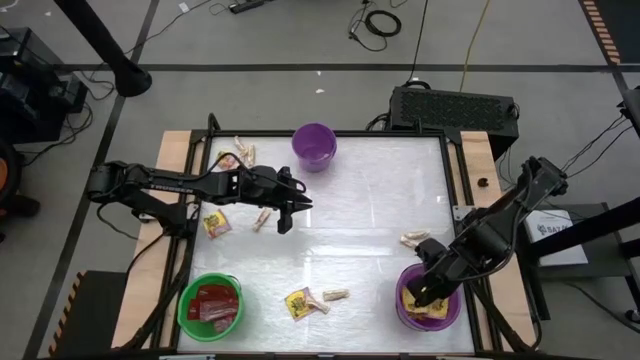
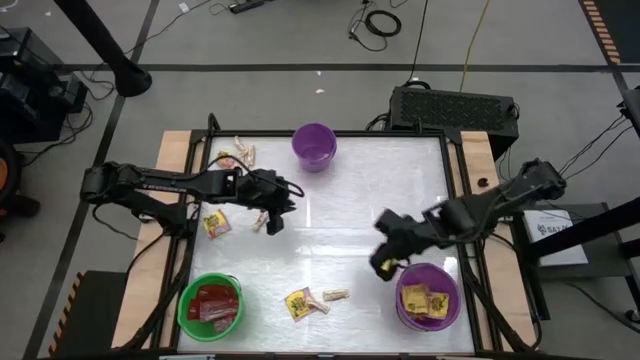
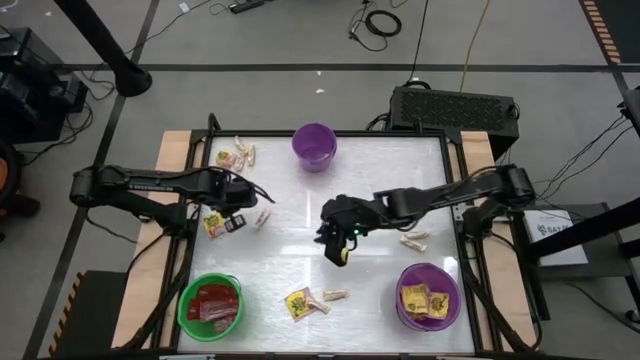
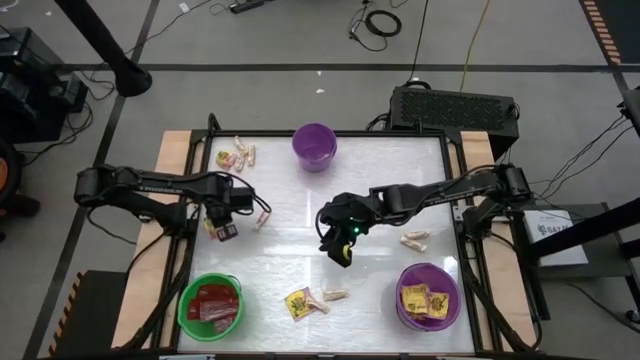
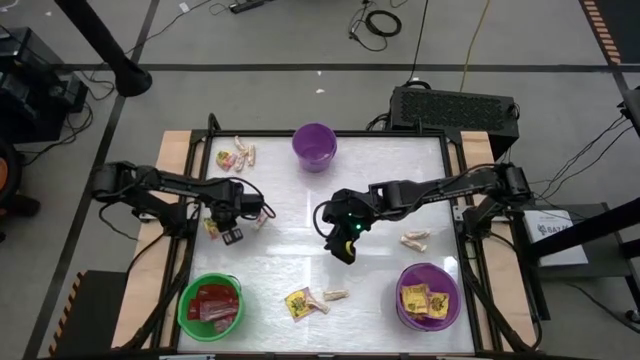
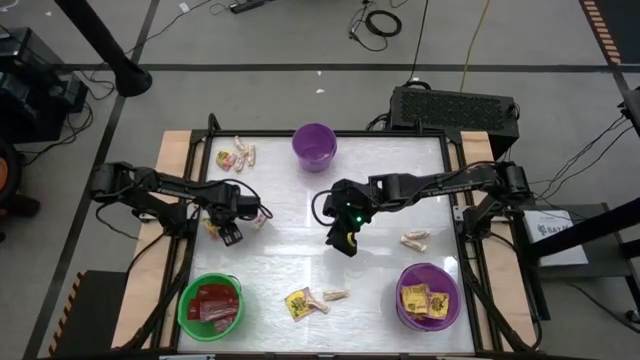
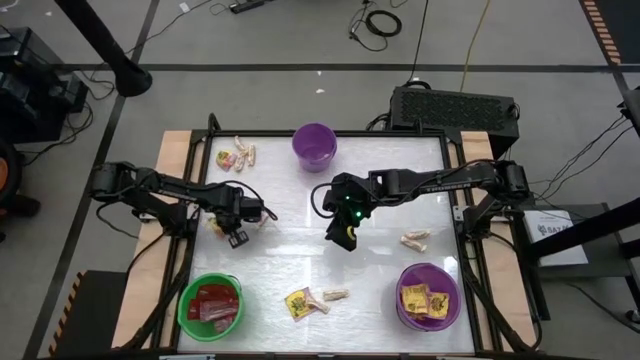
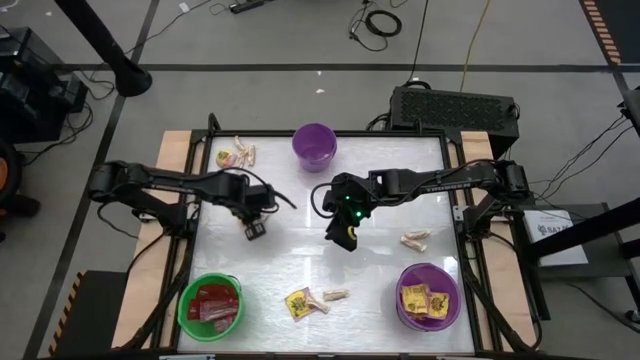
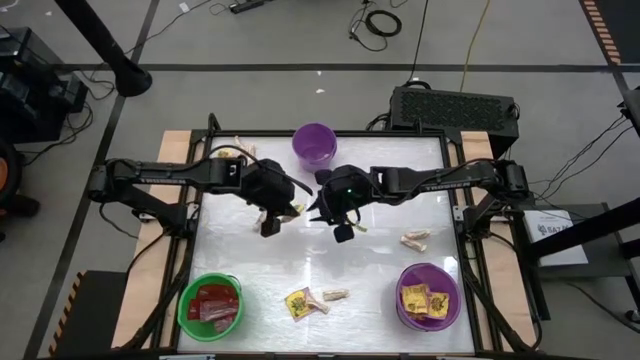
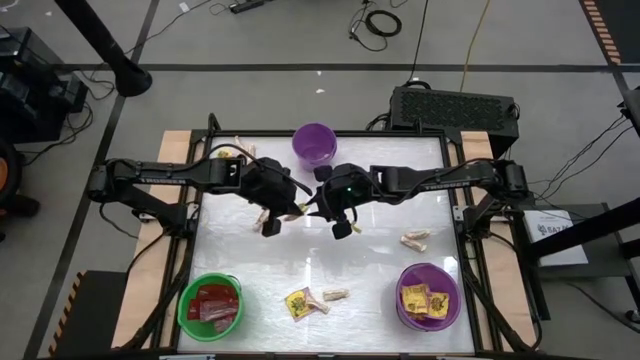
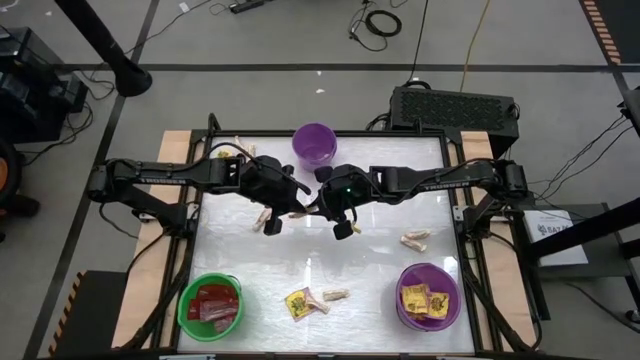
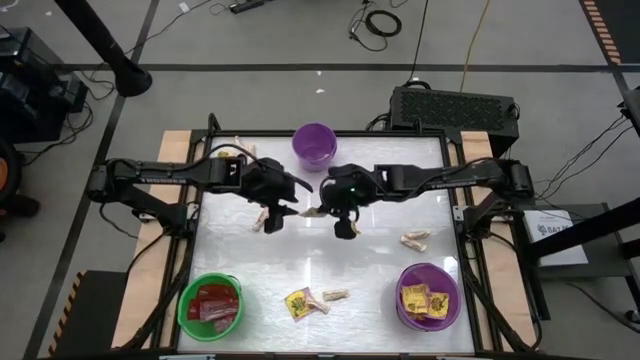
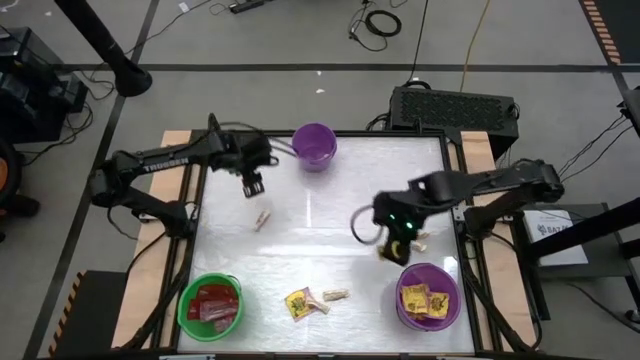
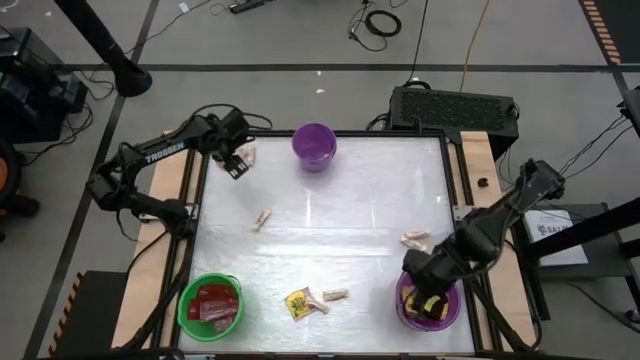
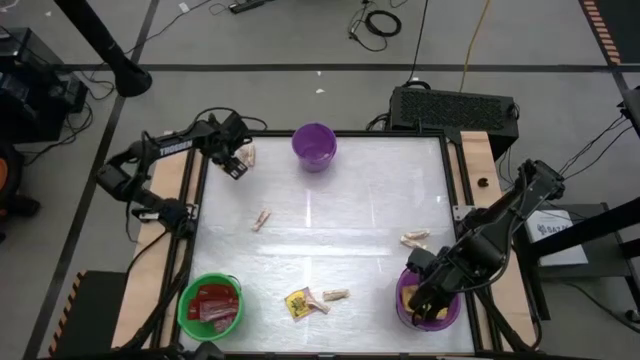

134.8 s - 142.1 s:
Task: Sort candy by brand, put in halloween buckets
Put the yellow candy into the bottom purple bucket

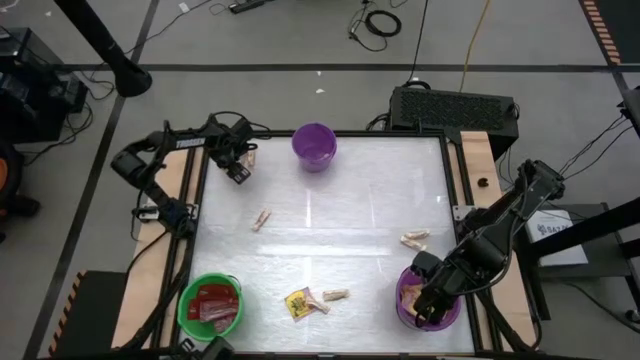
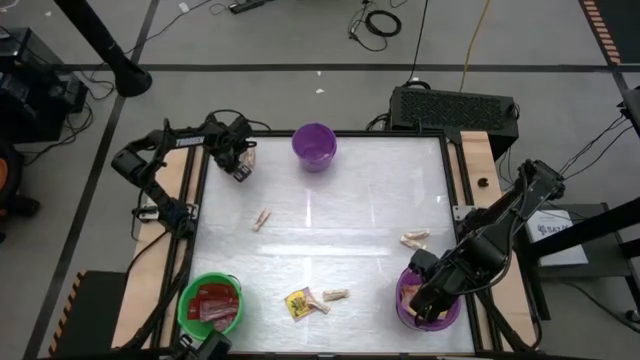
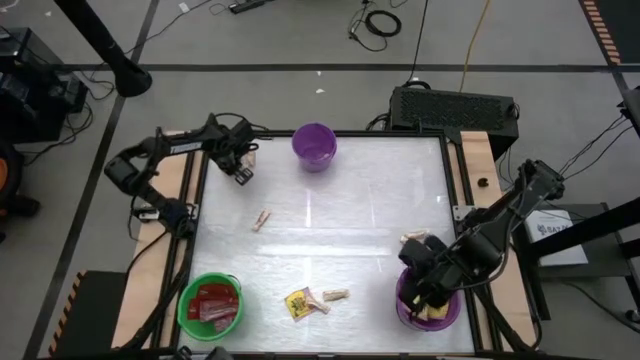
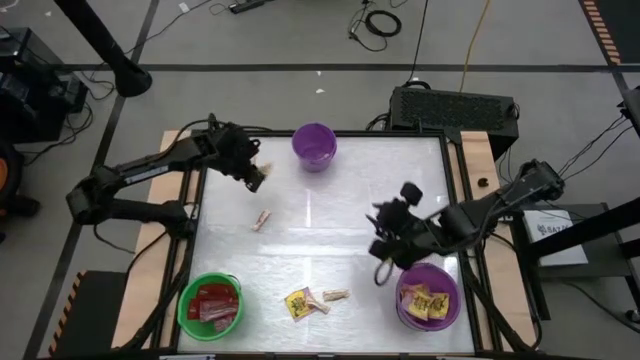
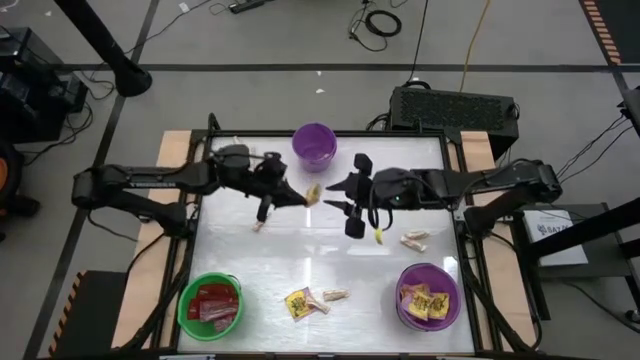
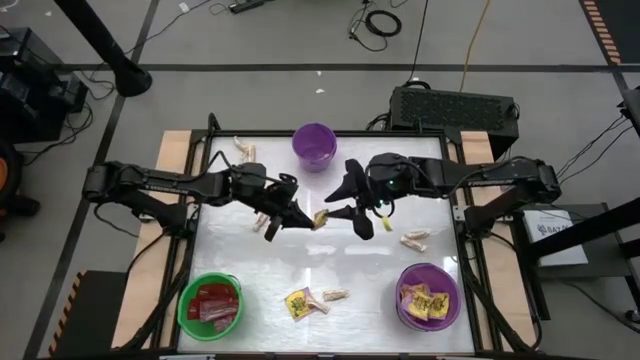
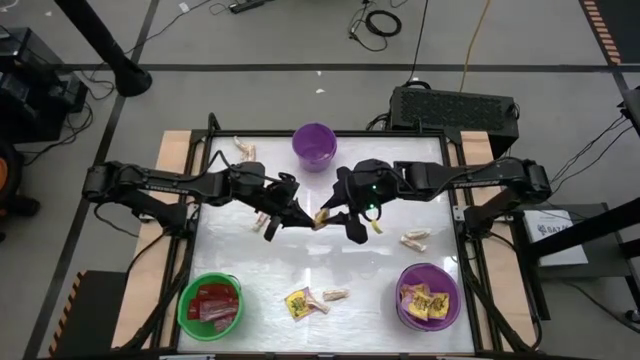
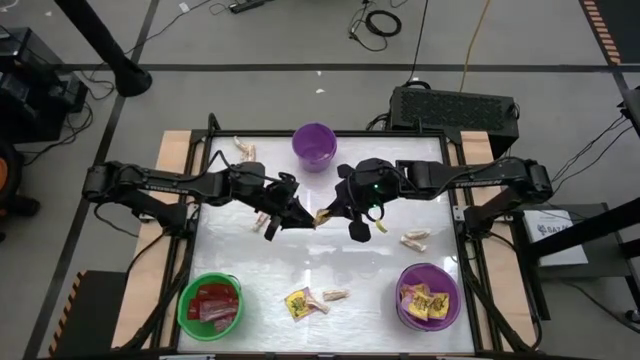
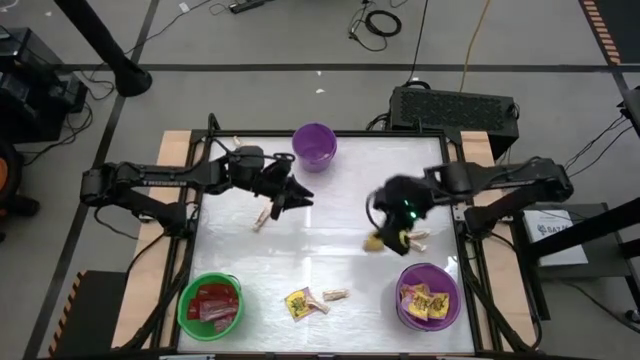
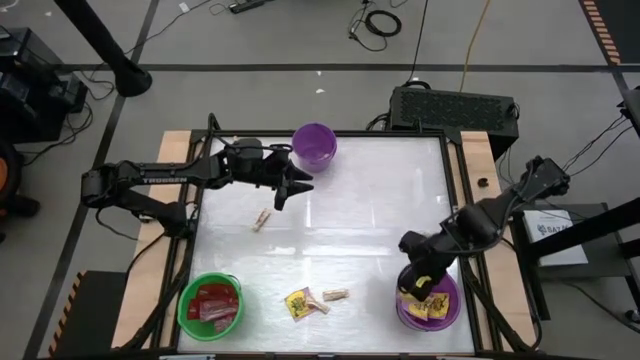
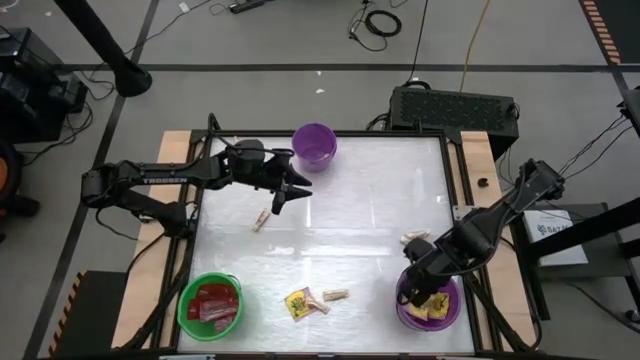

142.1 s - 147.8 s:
Put the yellow candy into the bottom purple bucket

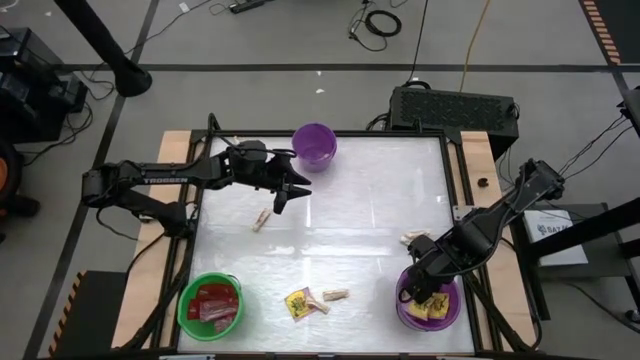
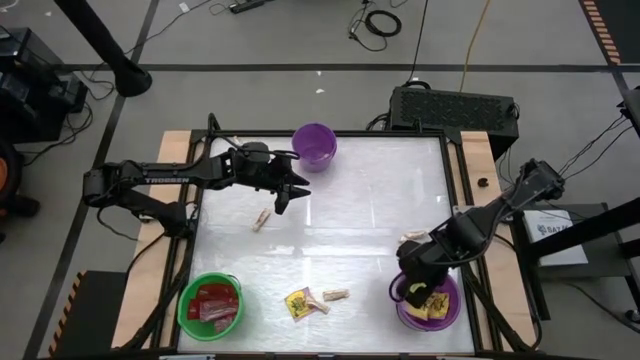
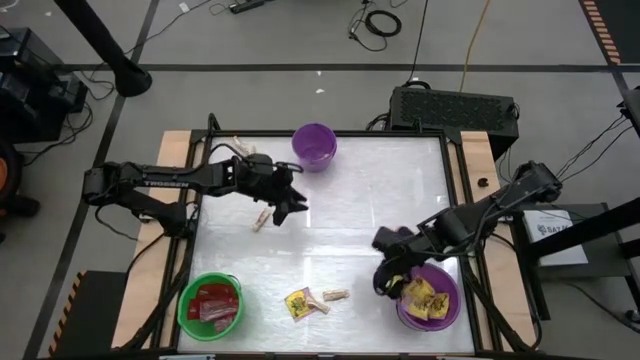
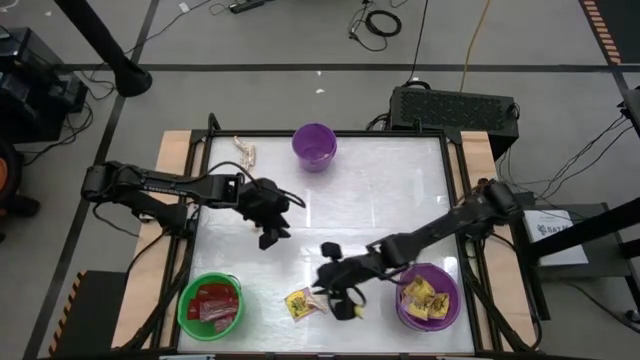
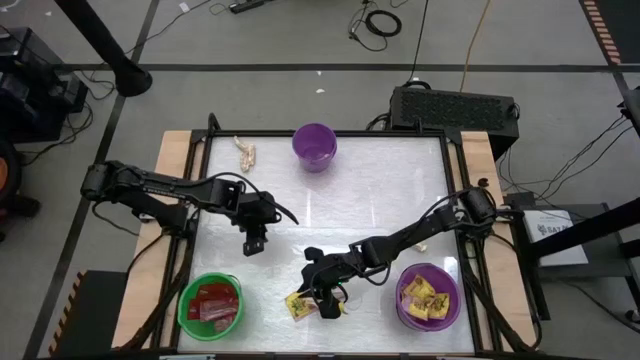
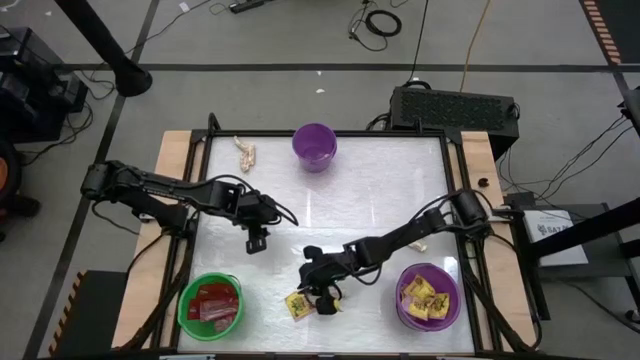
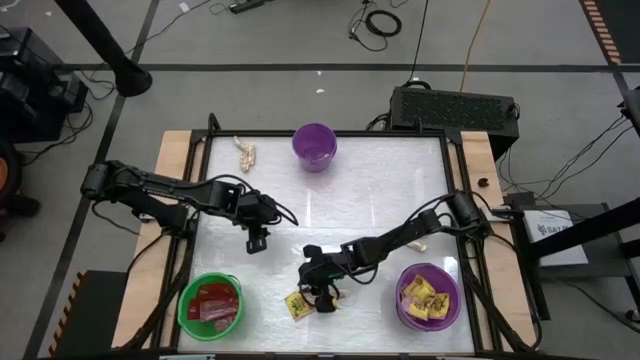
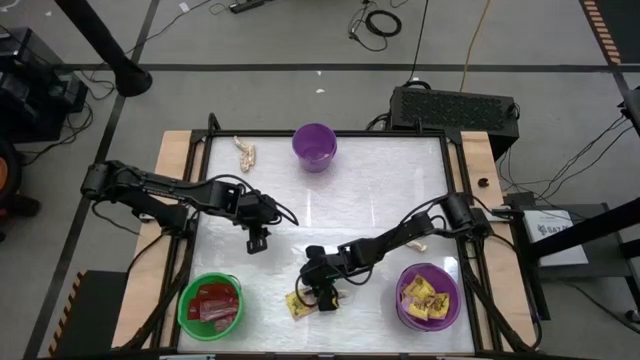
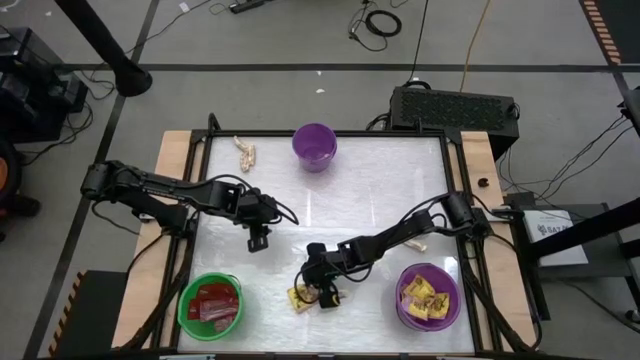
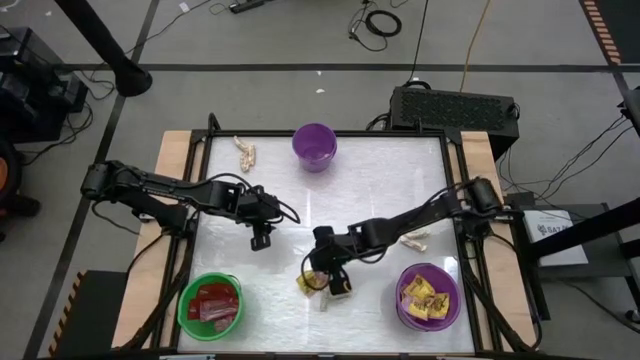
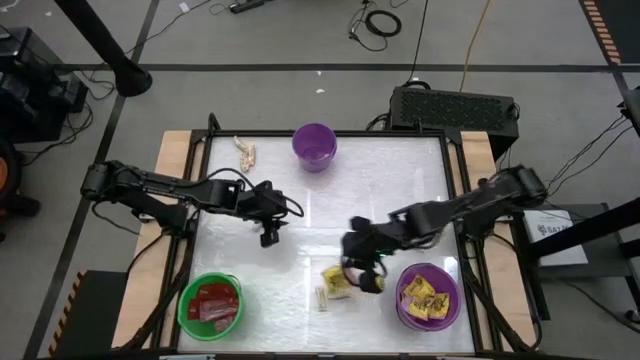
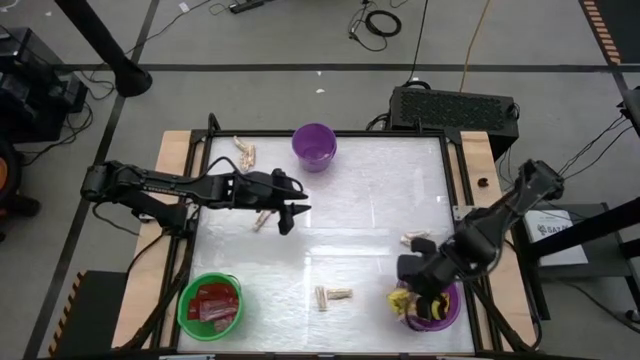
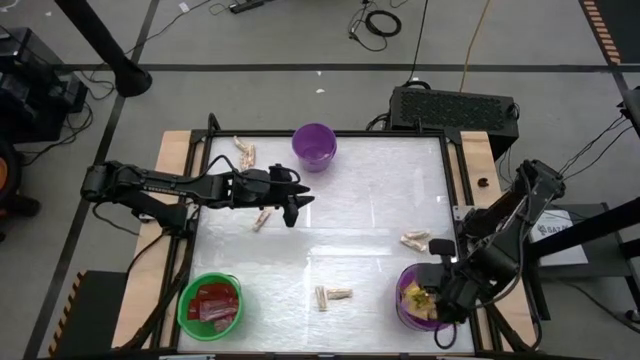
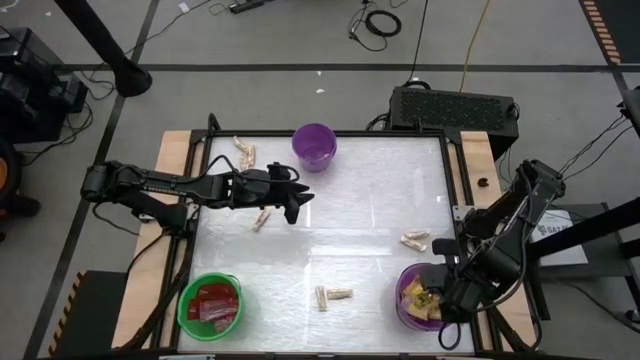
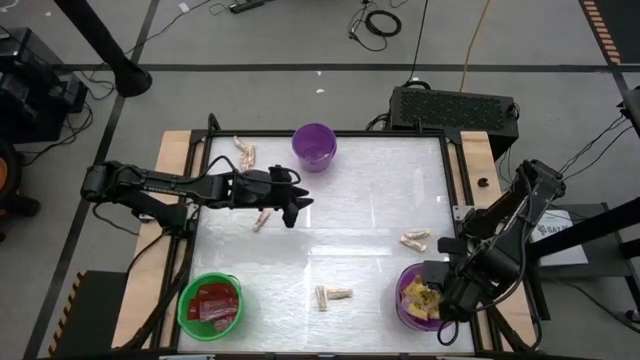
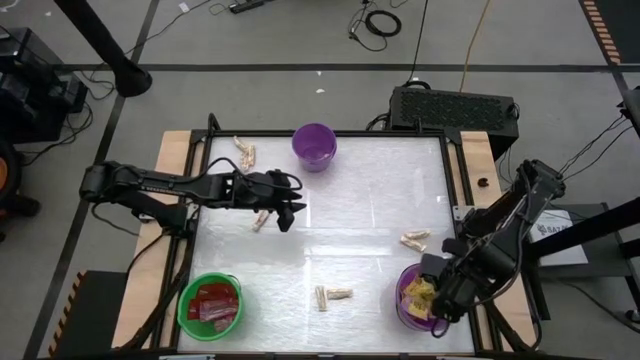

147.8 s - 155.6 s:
Put the yellow candy into the bottom purple bucket

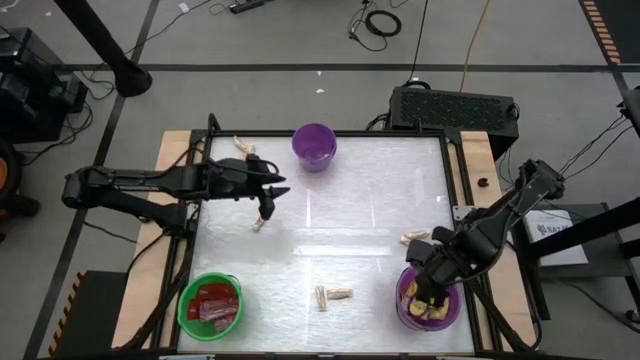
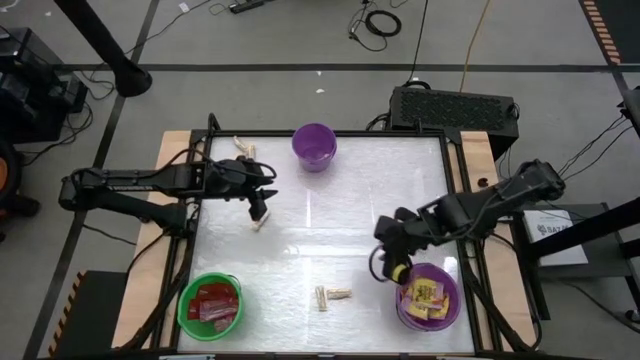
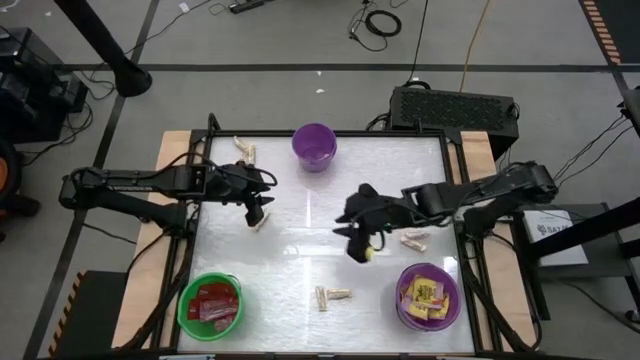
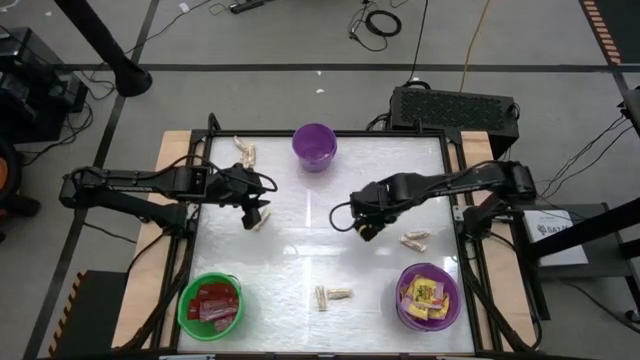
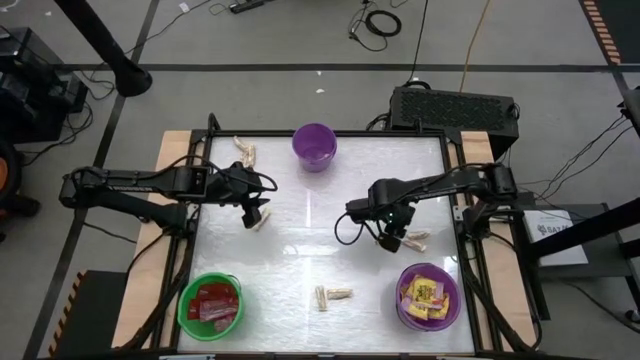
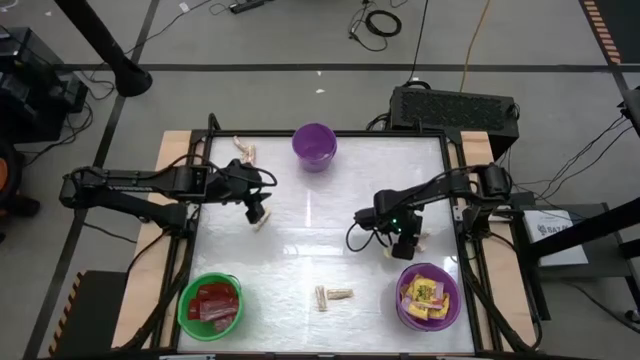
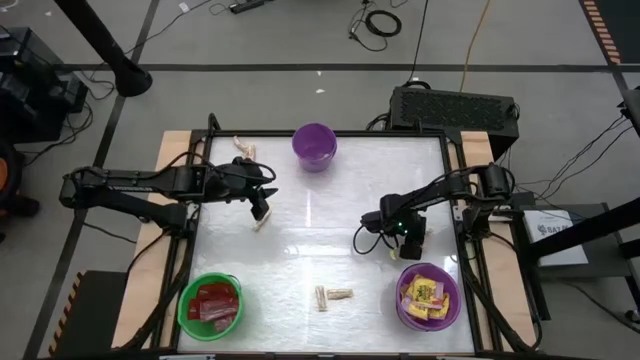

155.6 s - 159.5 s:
Put the white chocolate into the top purple bucket
